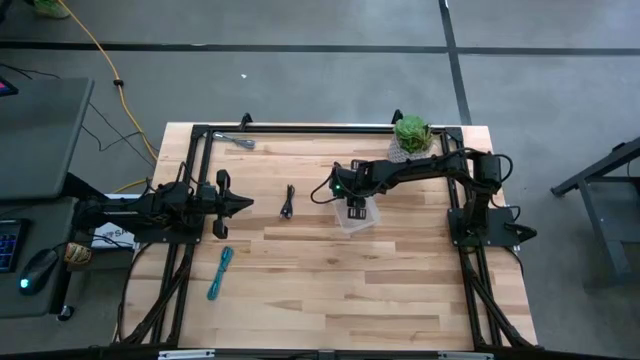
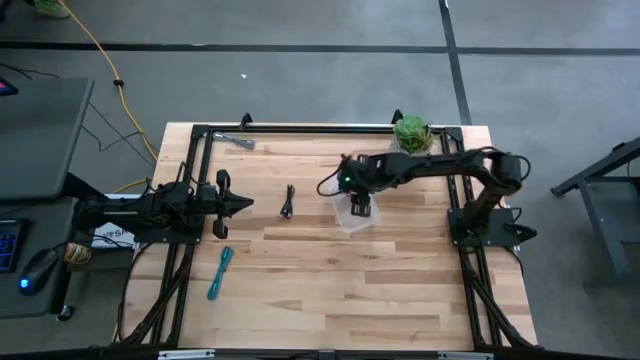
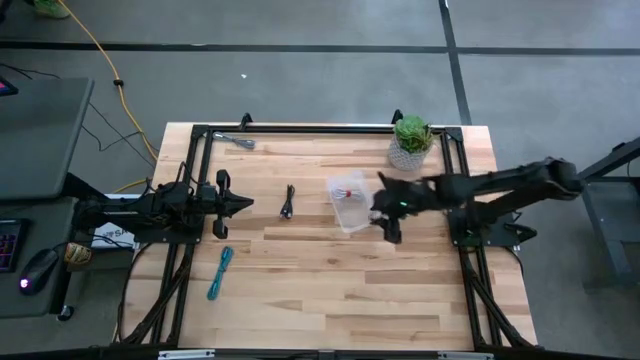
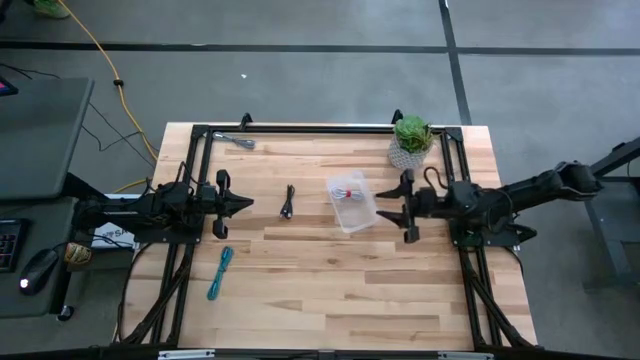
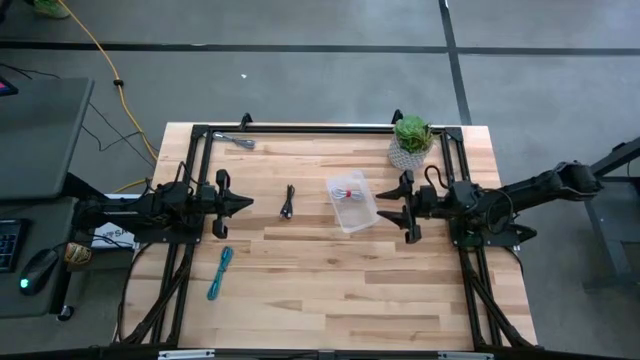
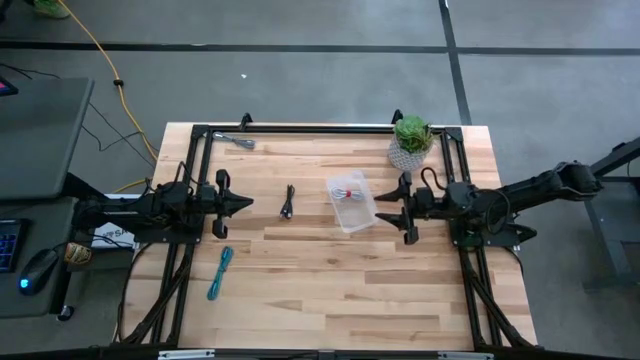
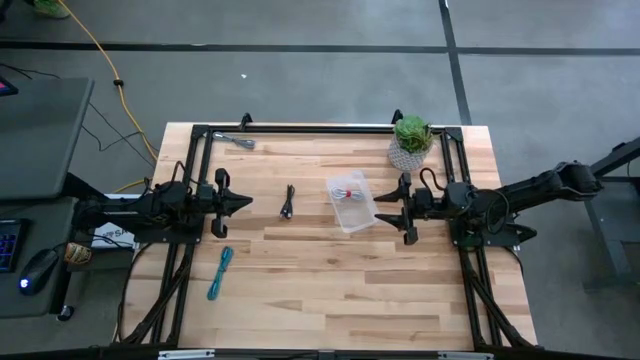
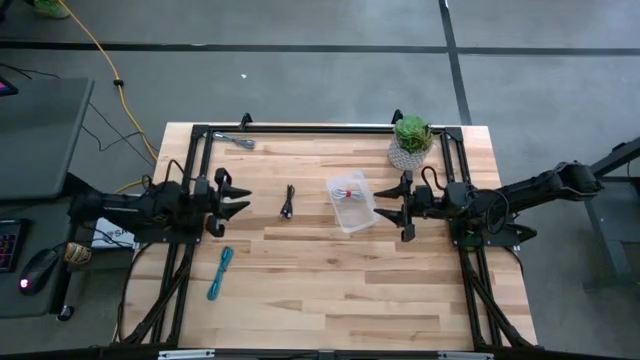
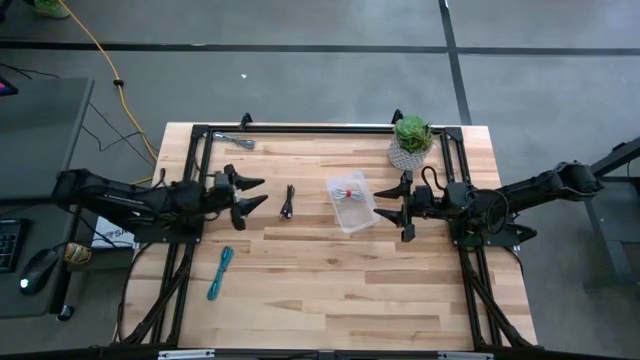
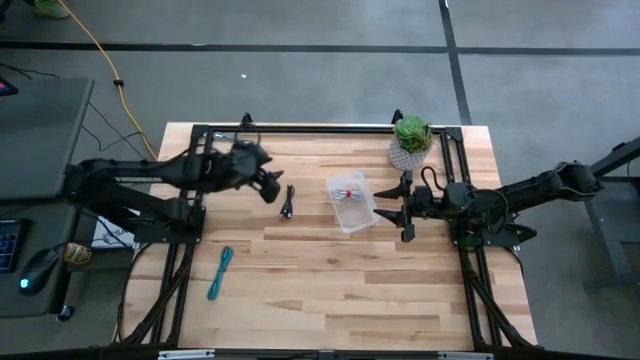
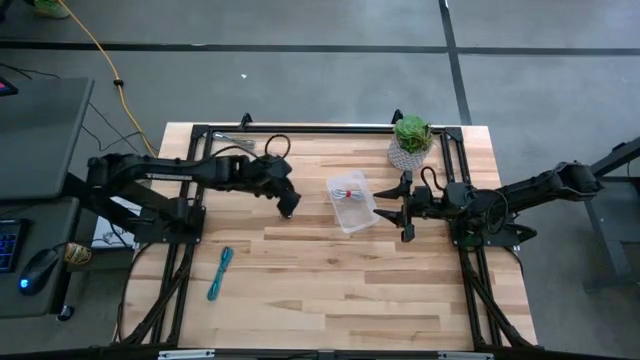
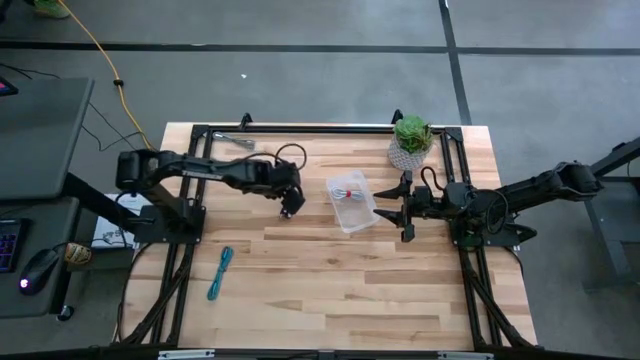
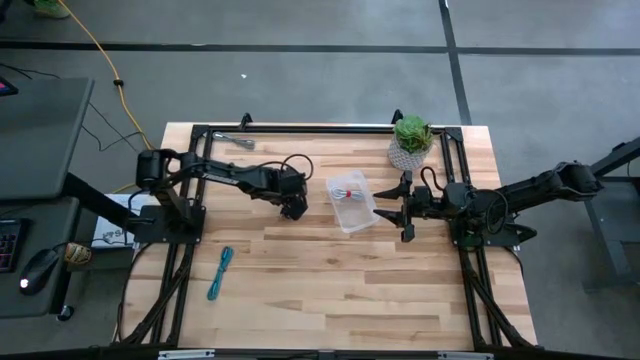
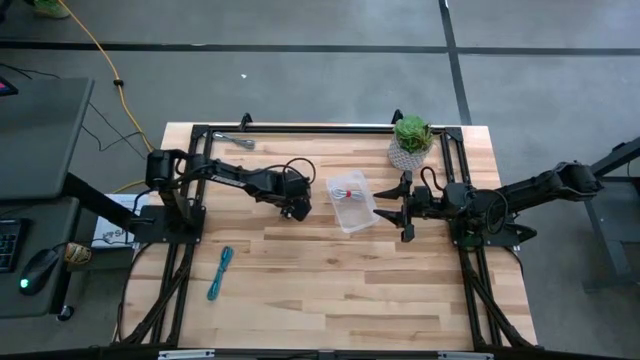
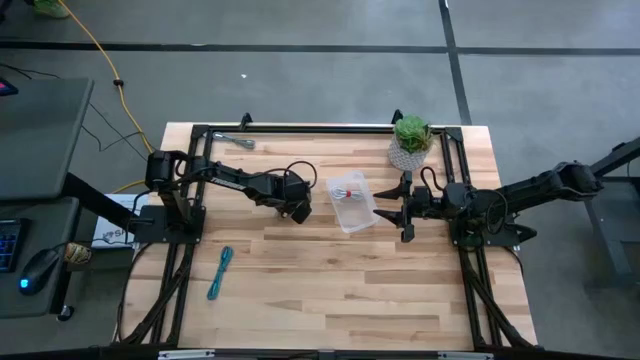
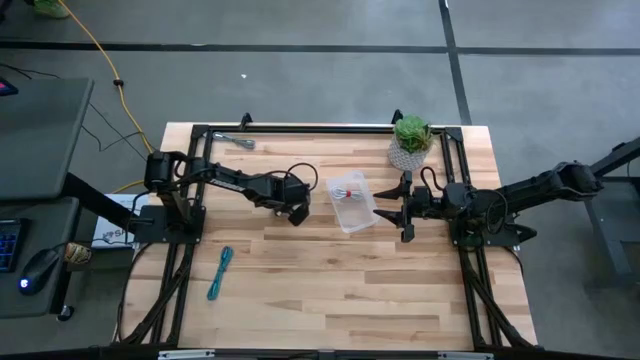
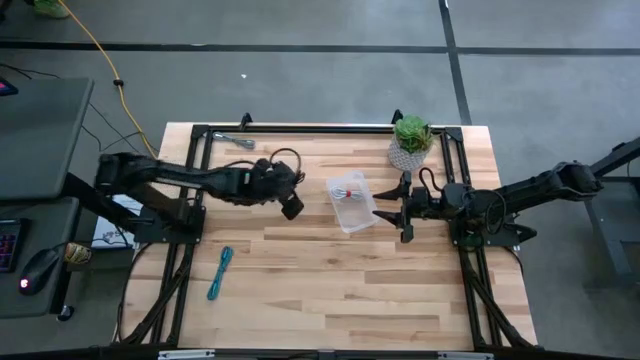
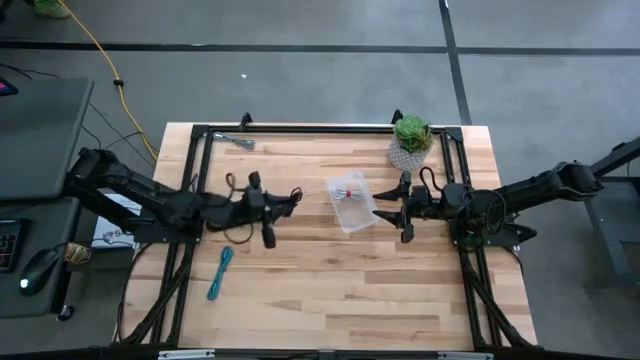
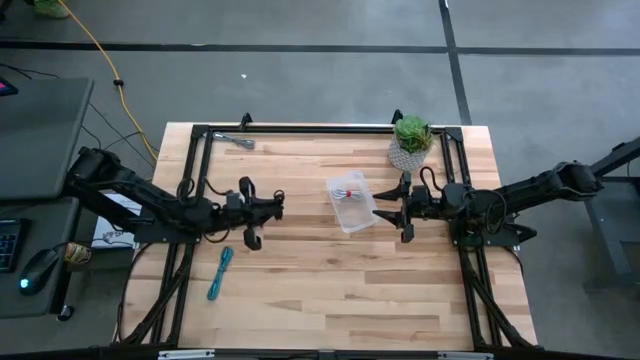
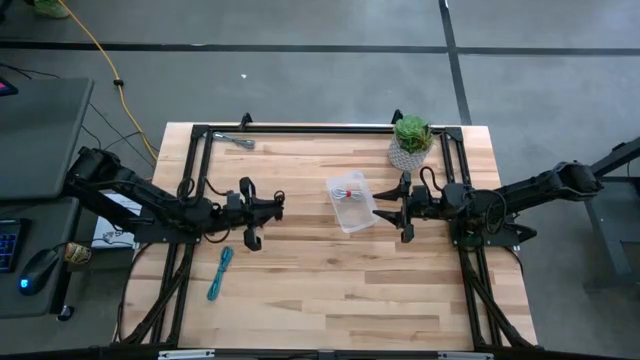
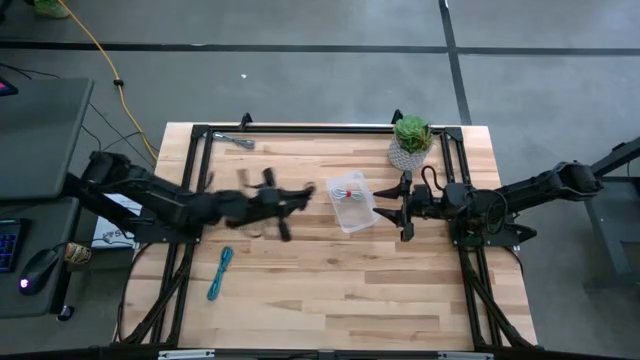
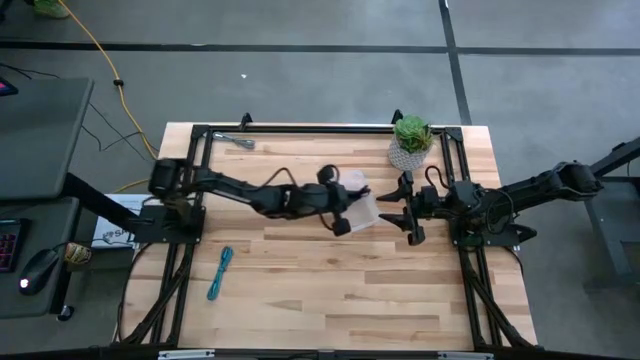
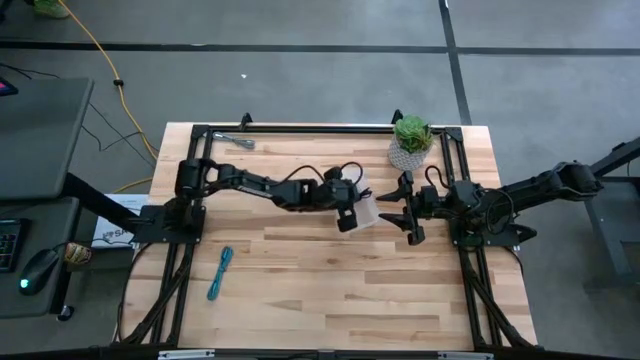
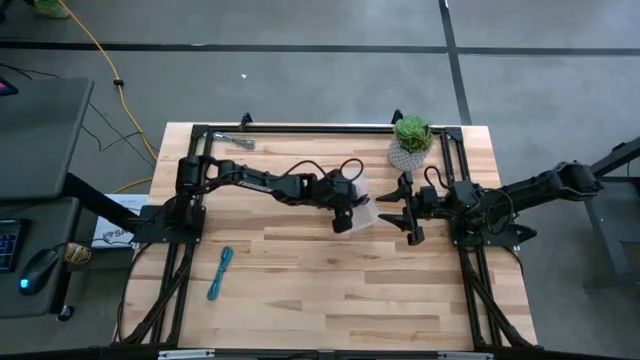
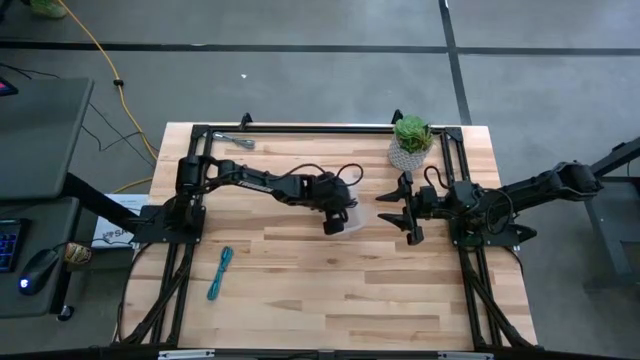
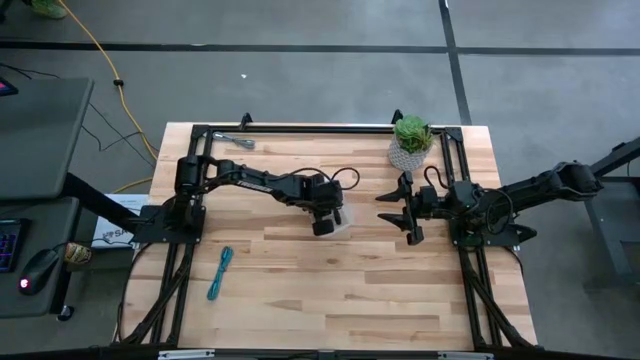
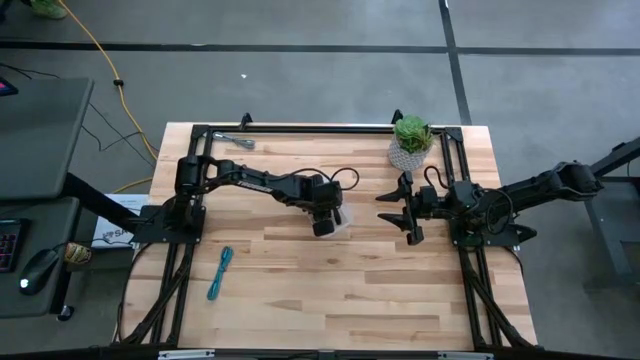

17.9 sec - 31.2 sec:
Task: Pick and place USB-C Cables
Put the black charger cable into the transparent bin

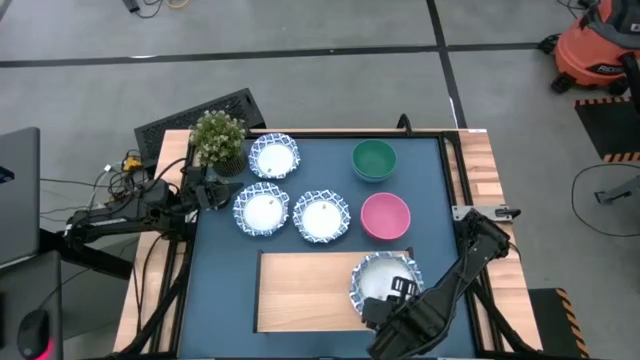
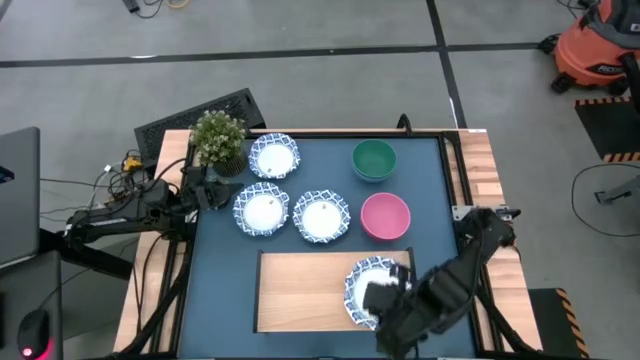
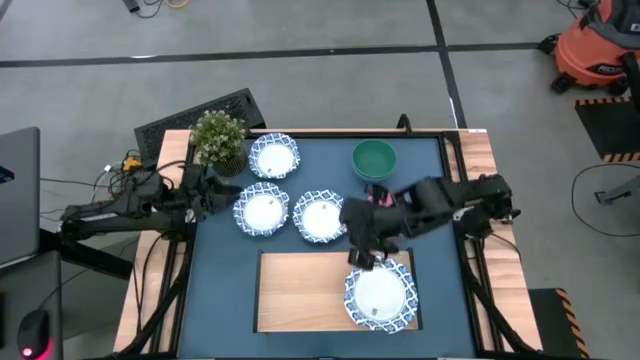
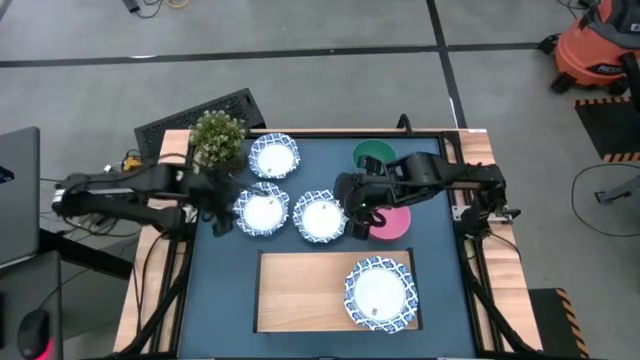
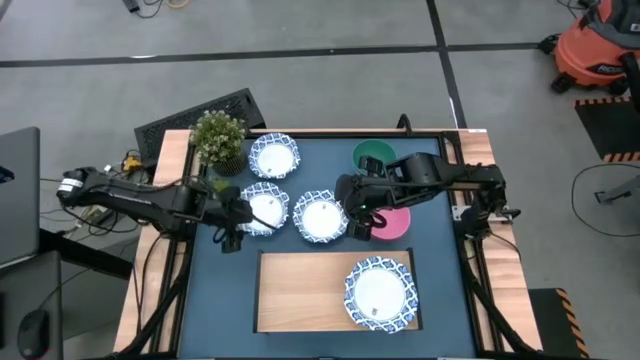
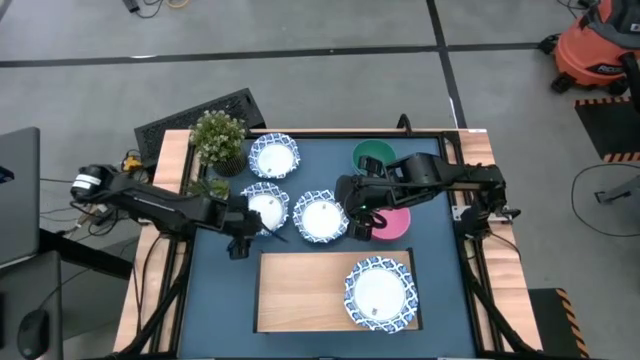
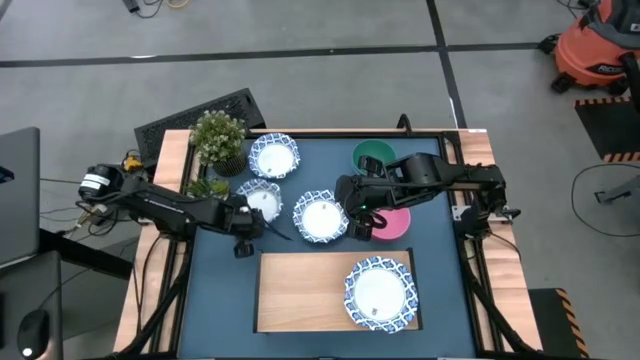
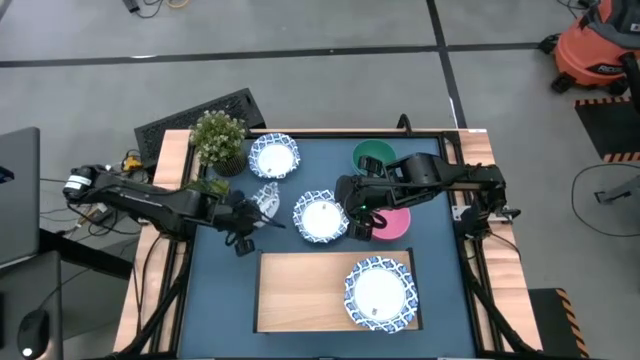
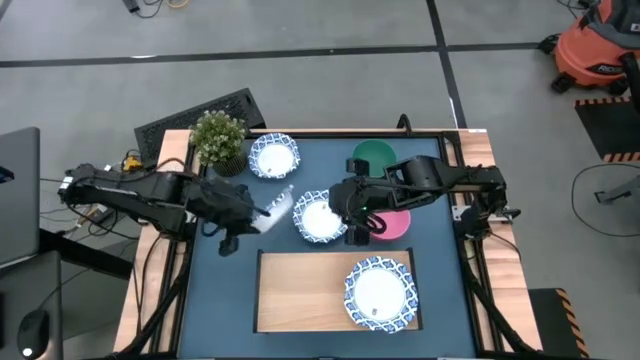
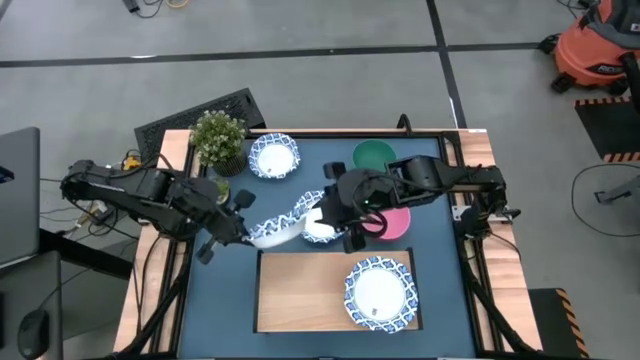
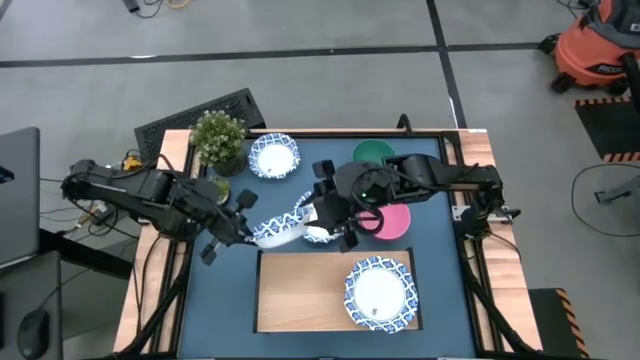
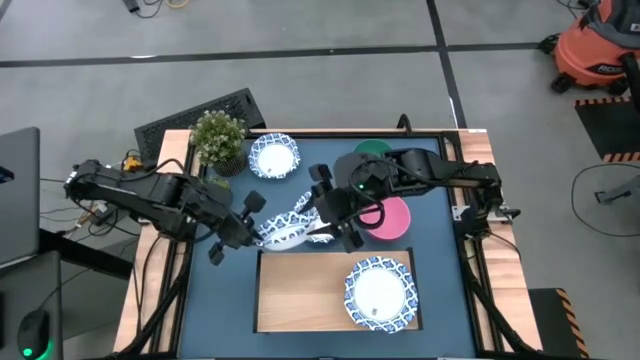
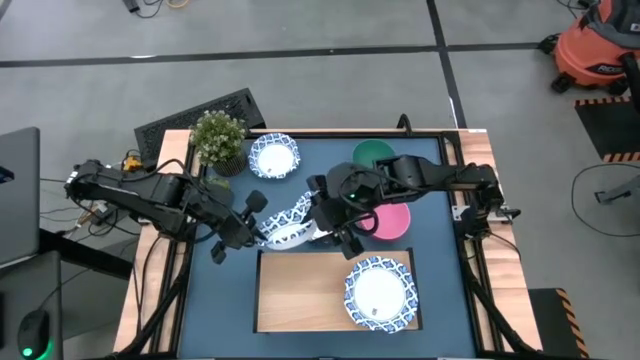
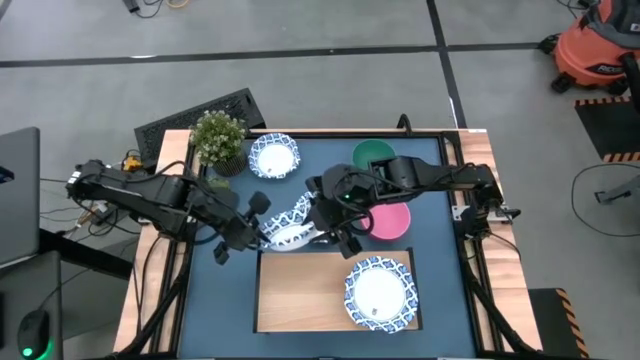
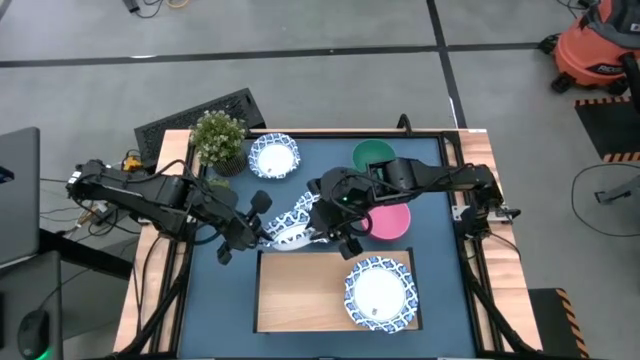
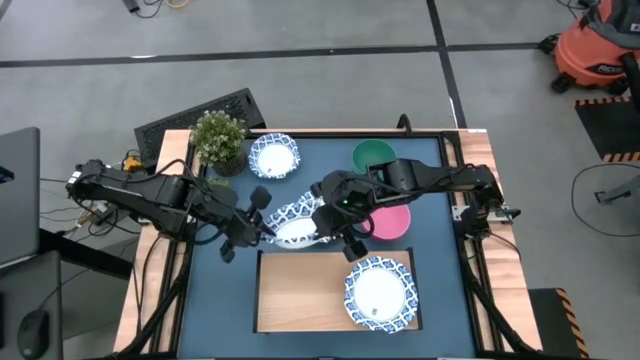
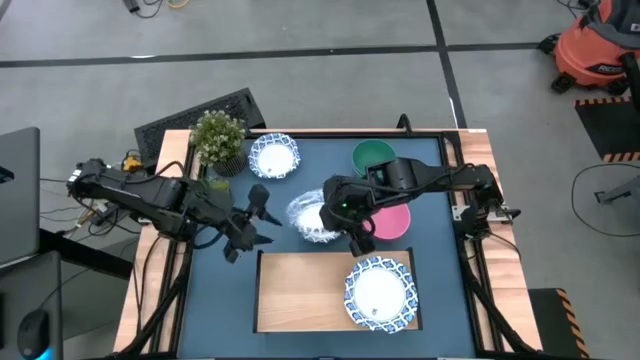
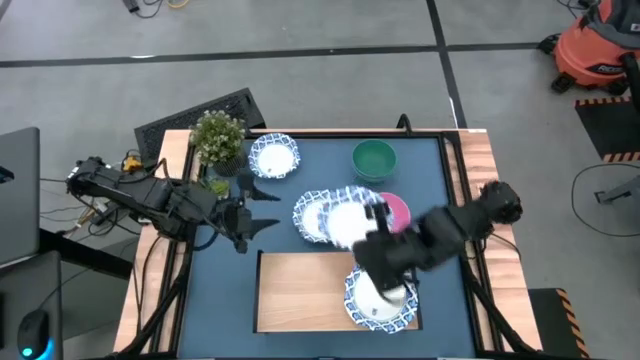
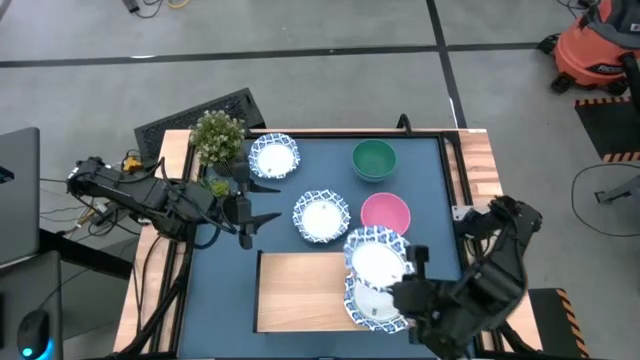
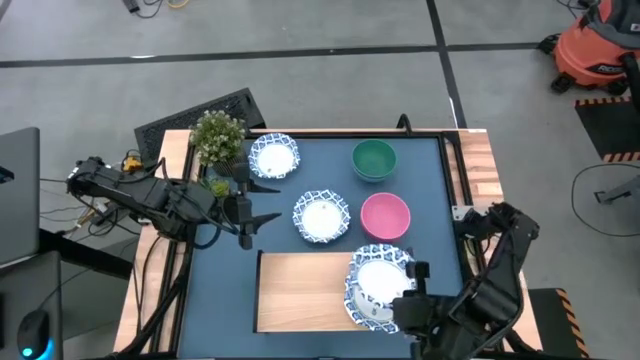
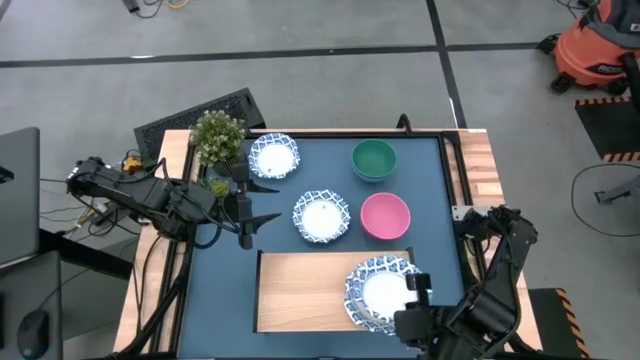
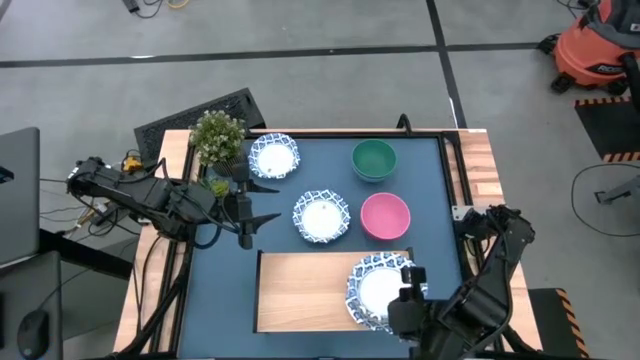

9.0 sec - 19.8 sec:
Task: Place and stack bowls onto a shelf
Stack the blue patterned bowl on top of the blue patterned bowl on the shelf
